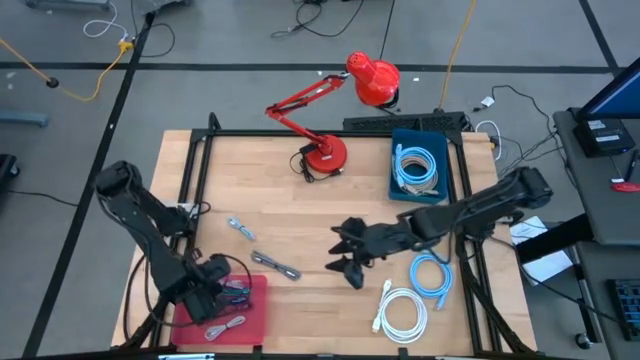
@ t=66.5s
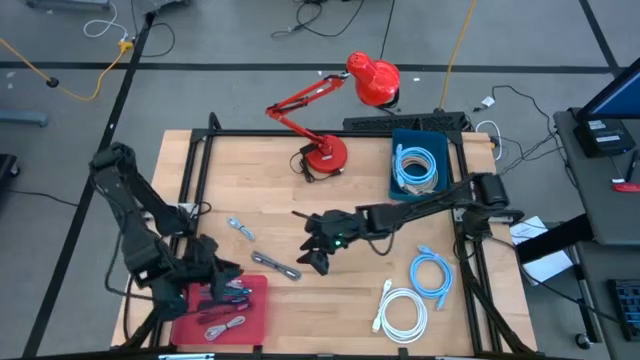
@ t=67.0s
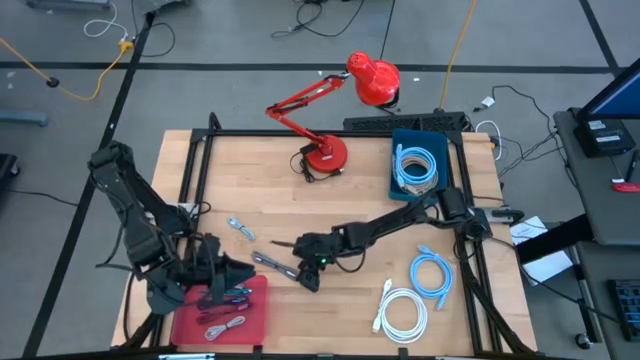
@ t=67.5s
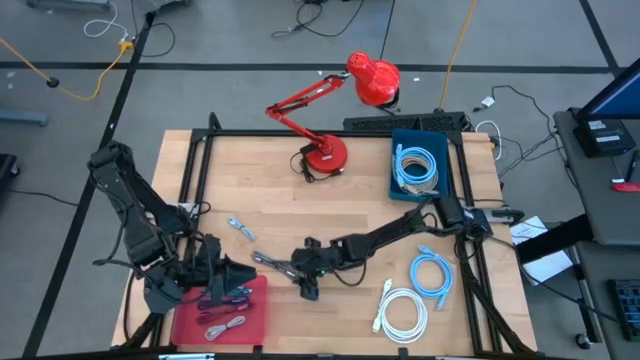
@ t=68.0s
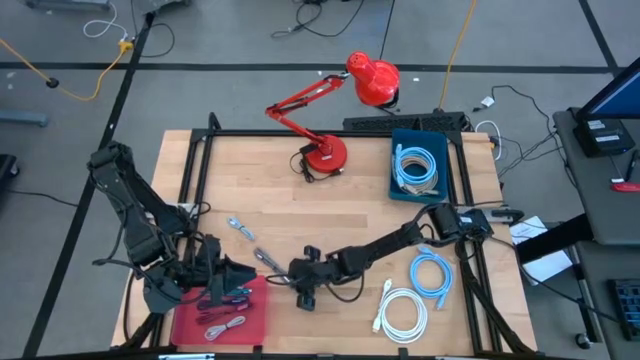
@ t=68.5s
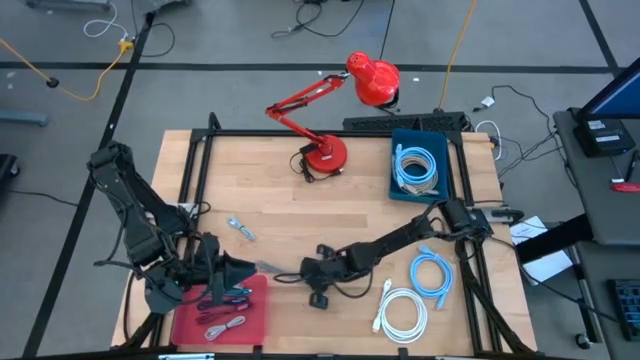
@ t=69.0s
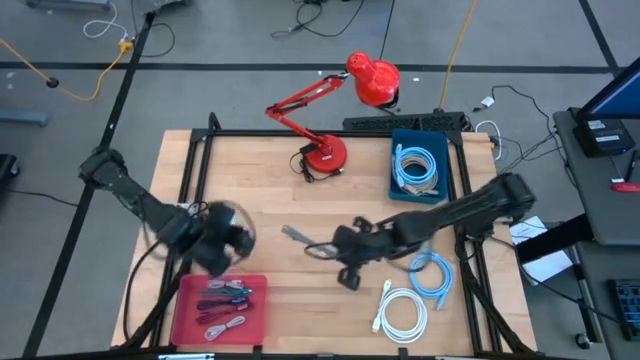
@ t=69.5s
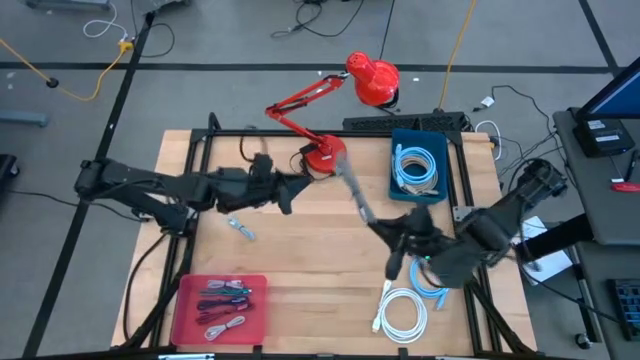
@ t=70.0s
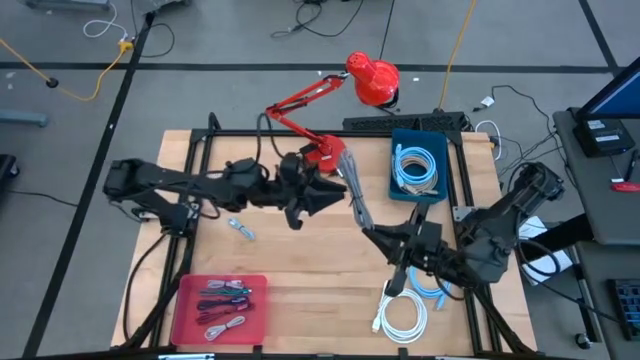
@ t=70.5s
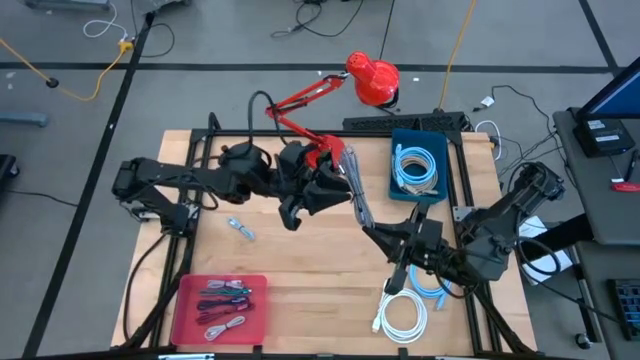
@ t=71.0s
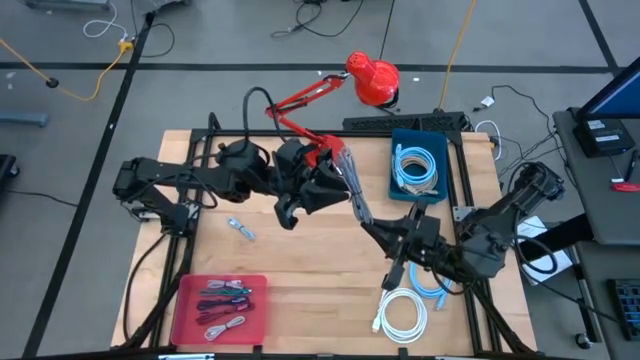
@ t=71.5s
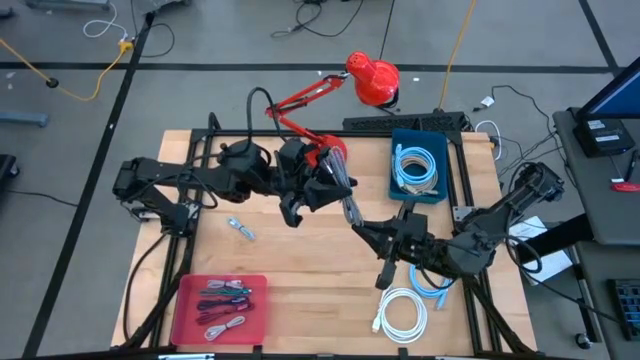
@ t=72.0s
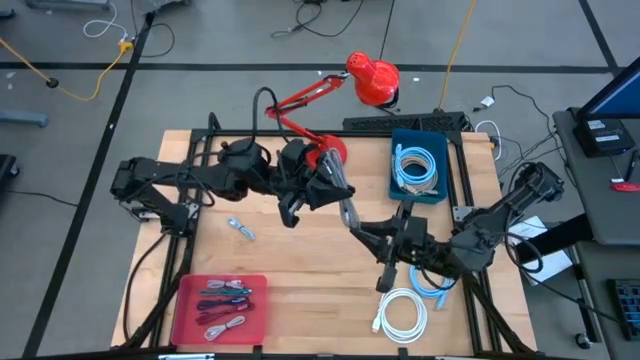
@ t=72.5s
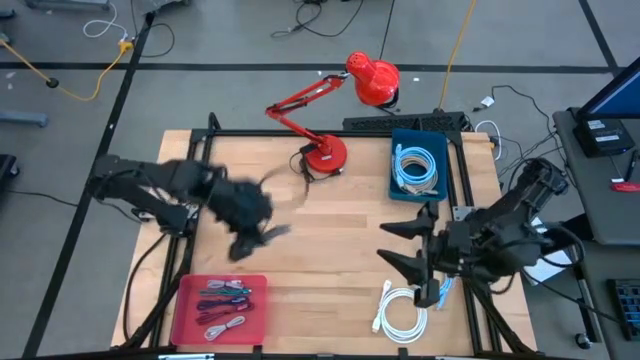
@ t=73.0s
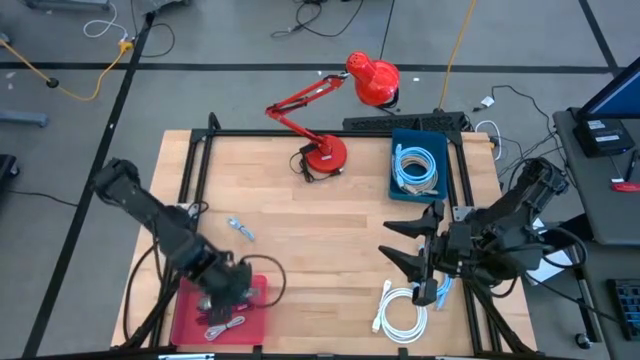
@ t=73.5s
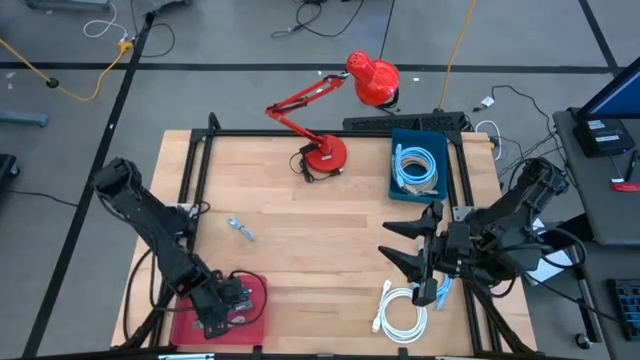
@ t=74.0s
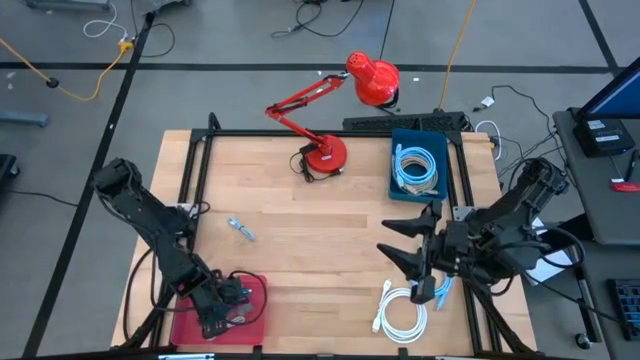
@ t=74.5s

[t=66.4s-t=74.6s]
Task: Sort cables
Put the black and white charger cable into the pink bin

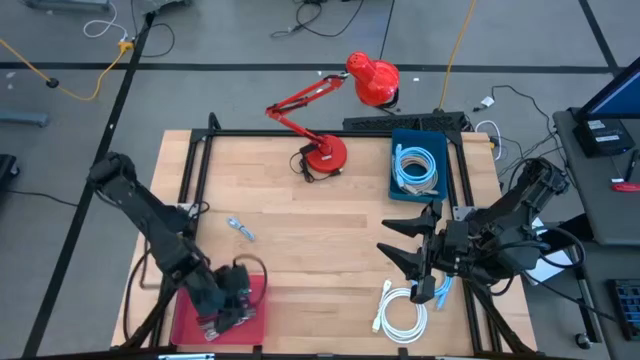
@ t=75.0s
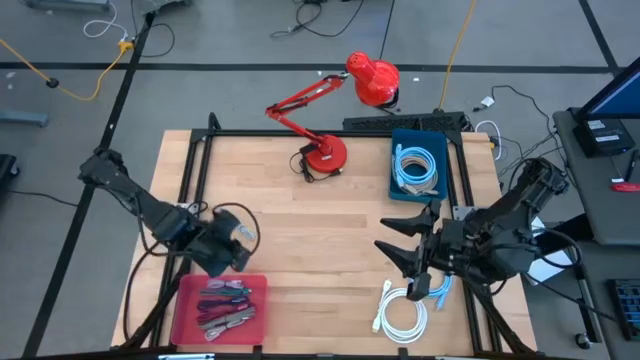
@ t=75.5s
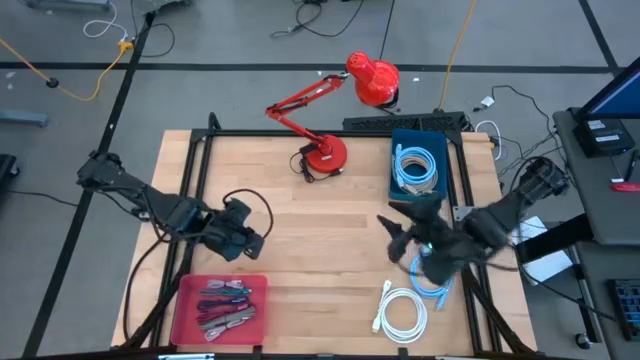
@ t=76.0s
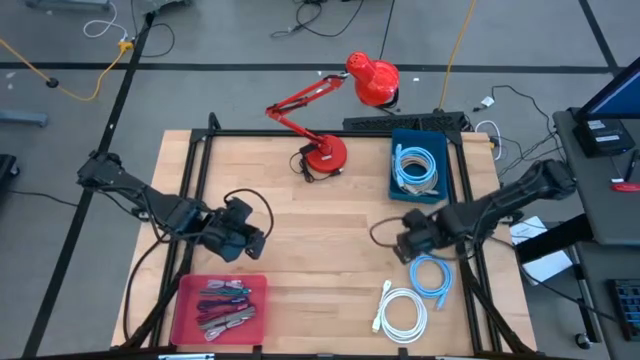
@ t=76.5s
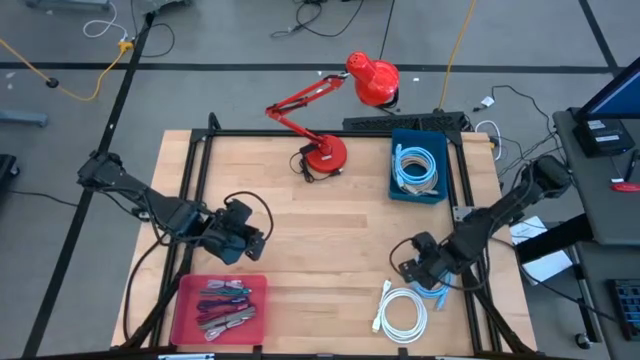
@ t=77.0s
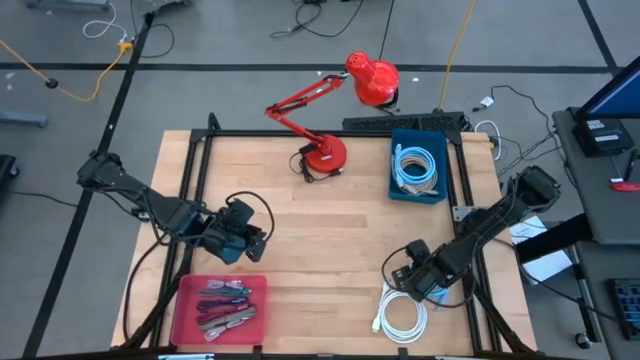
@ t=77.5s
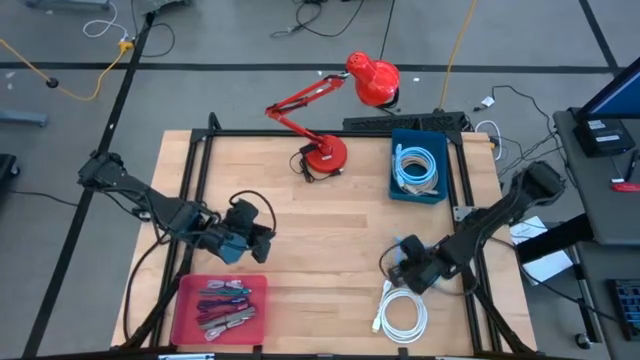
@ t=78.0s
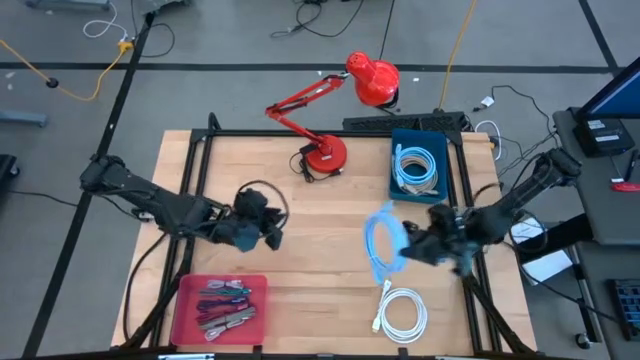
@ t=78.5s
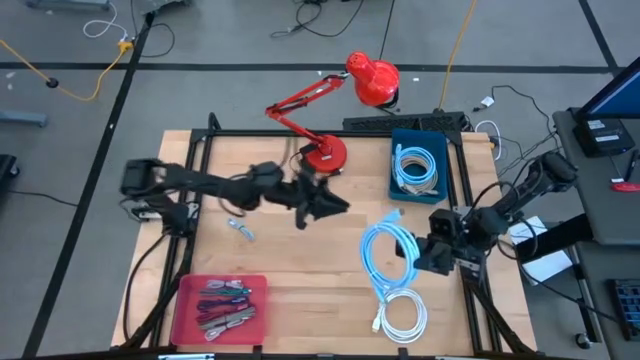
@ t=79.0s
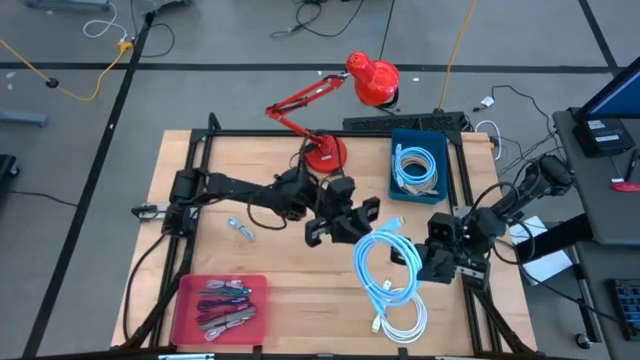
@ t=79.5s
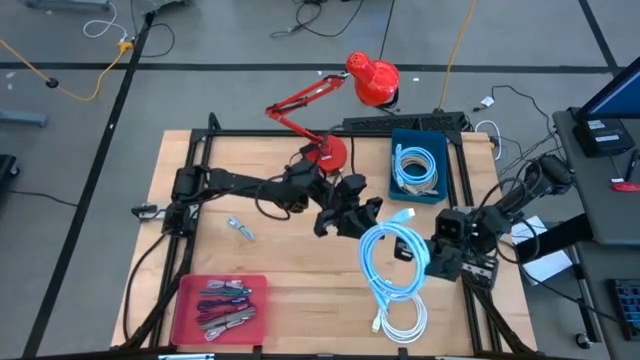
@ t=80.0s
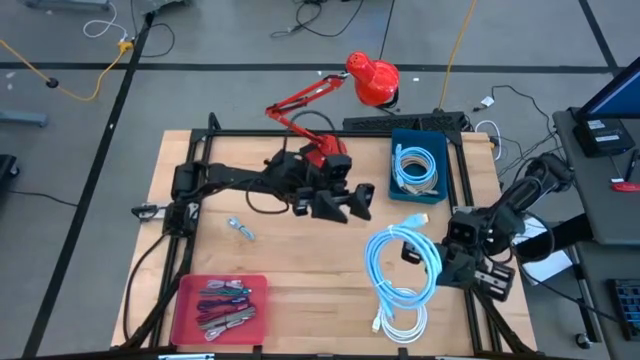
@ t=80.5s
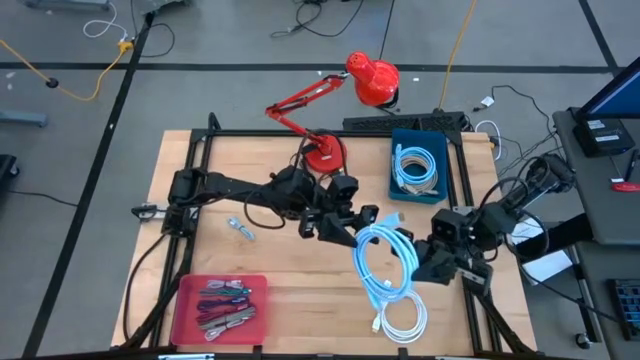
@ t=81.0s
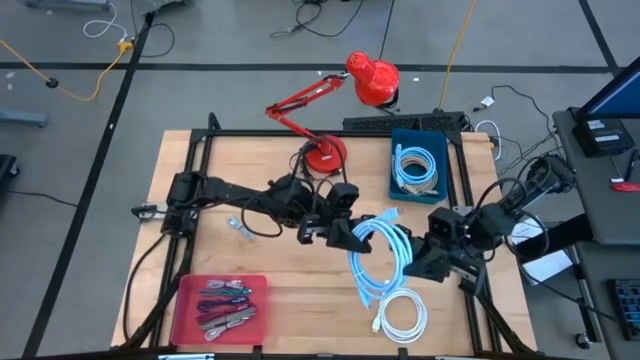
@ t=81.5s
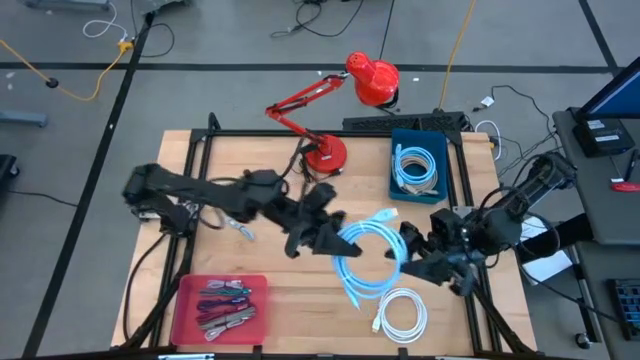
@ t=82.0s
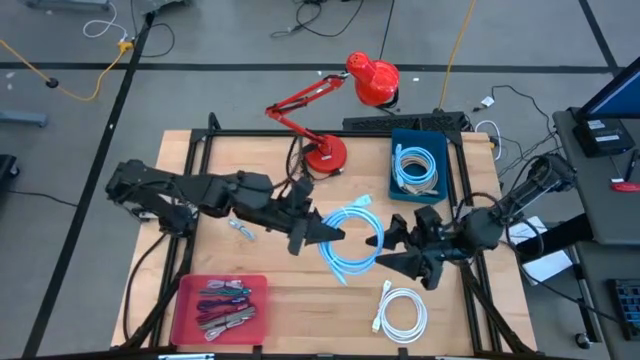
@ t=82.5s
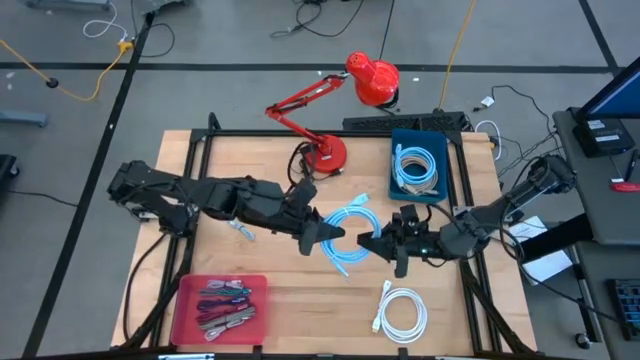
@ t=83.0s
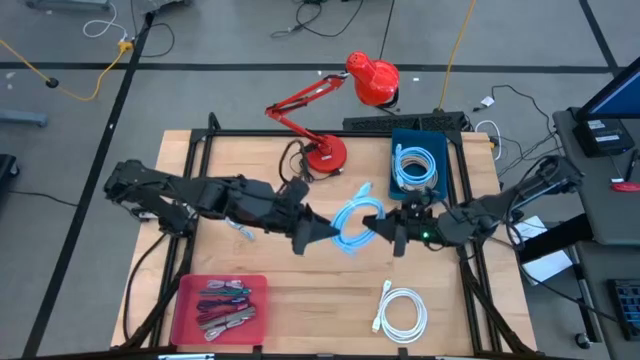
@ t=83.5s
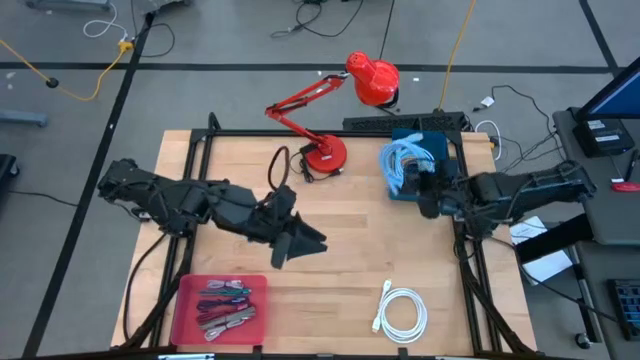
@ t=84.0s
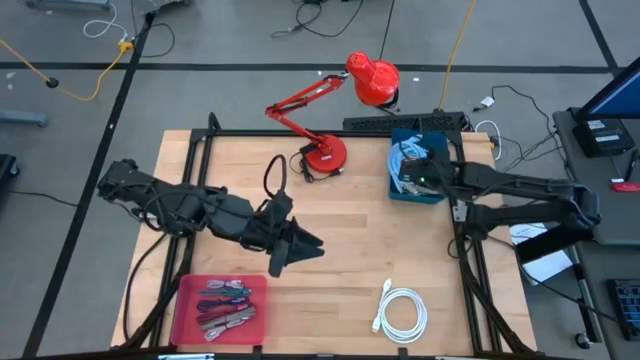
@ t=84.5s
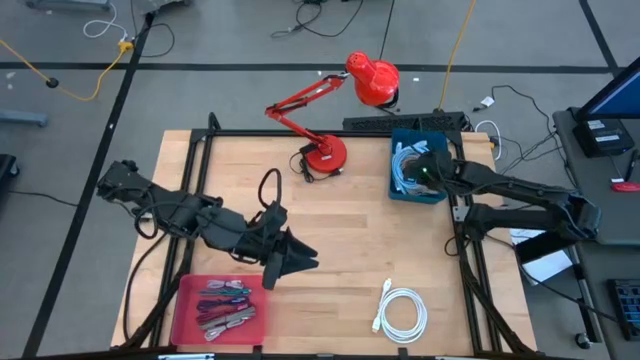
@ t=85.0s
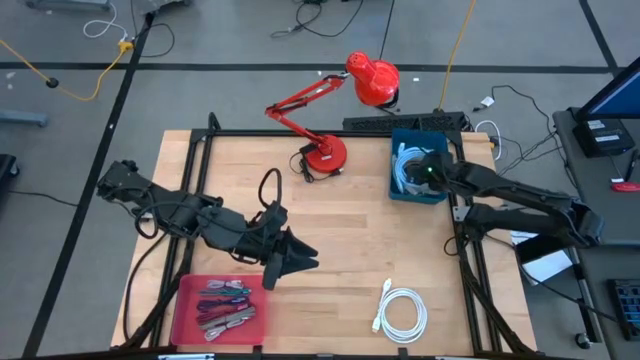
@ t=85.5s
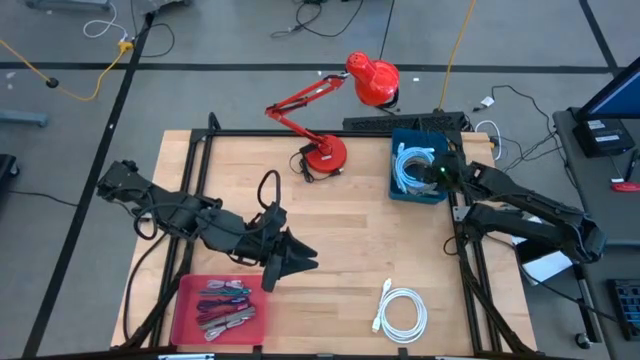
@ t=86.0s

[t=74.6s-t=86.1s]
Put the blue usb cable into the blue bin

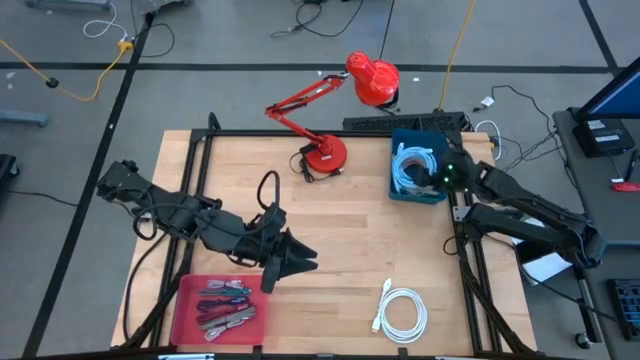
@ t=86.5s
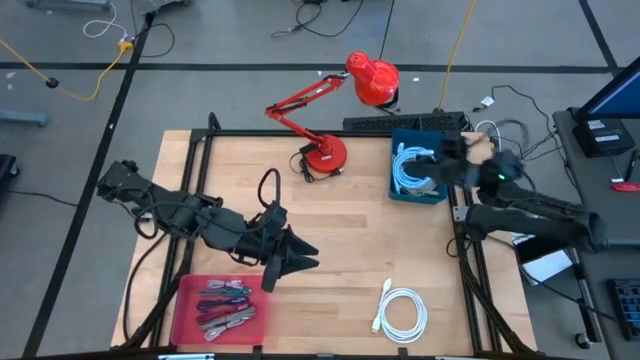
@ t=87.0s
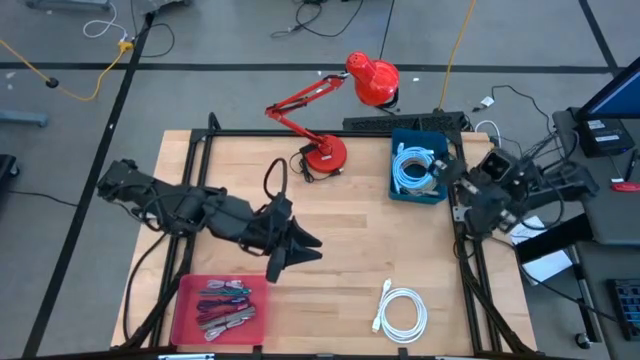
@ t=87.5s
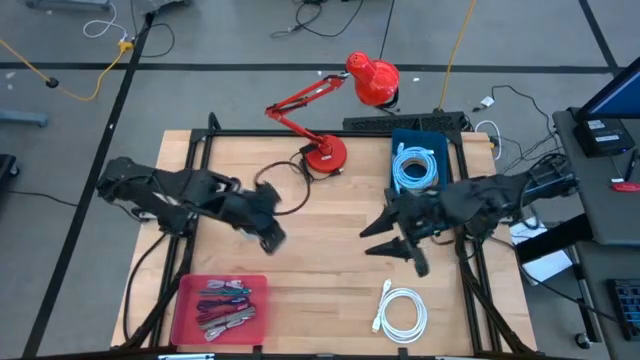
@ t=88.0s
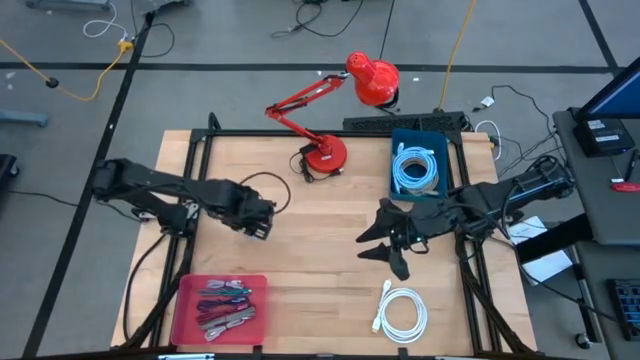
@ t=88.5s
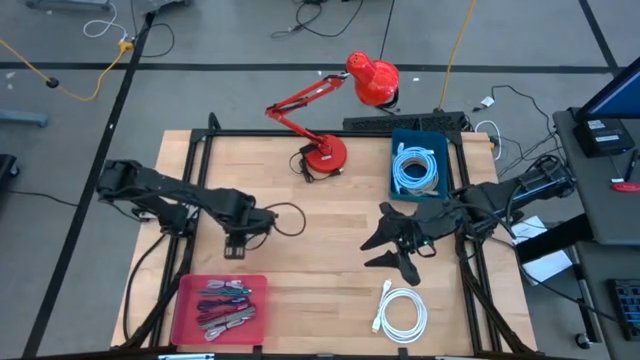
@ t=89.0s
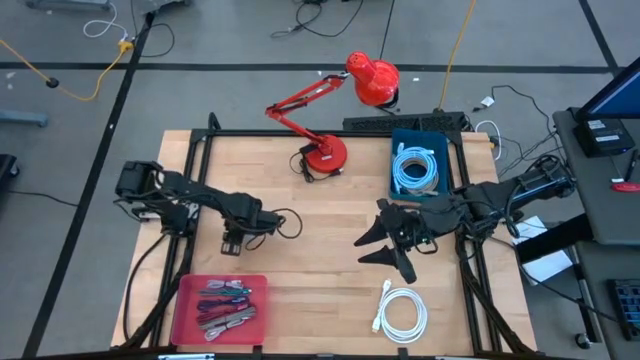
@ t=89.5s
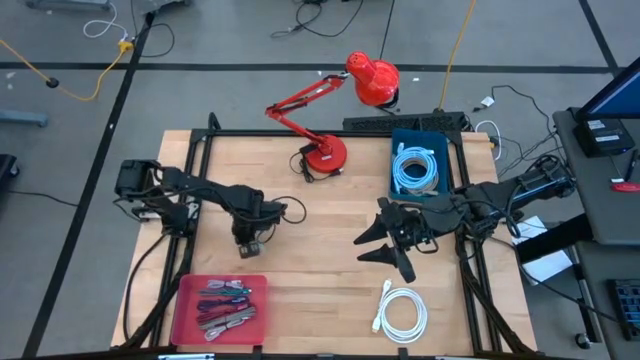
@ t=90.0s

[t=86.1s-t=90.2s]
Put the gray charger cable into the pink bin
